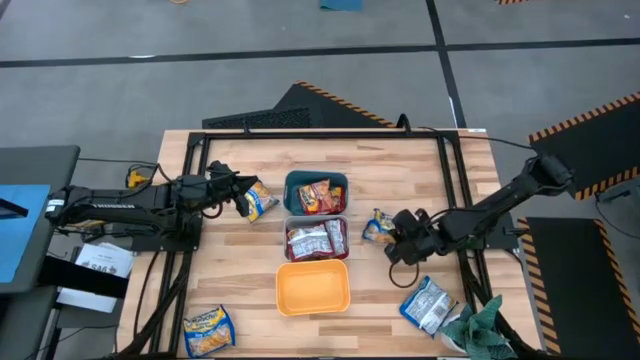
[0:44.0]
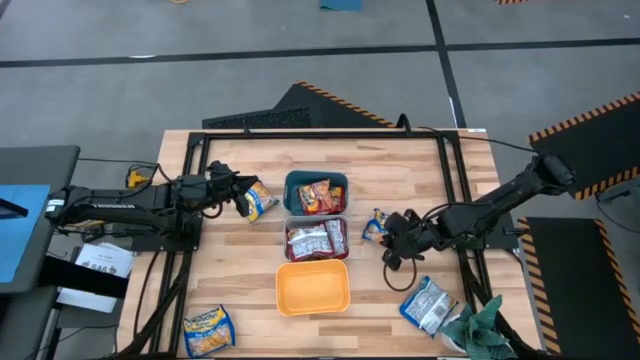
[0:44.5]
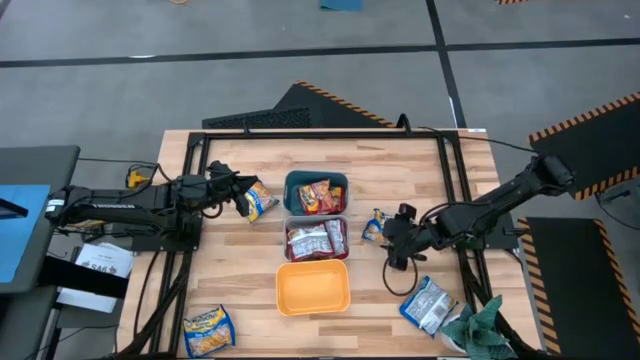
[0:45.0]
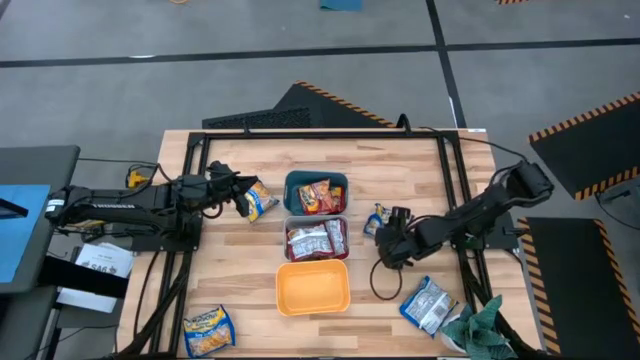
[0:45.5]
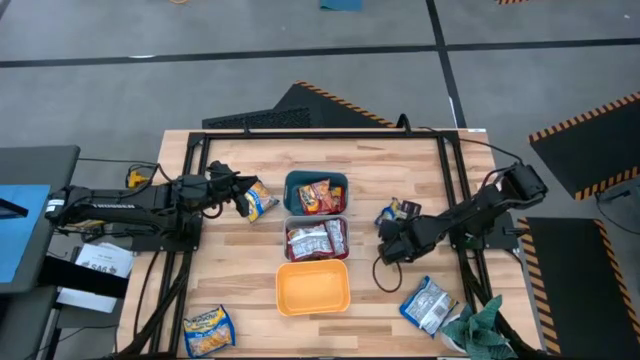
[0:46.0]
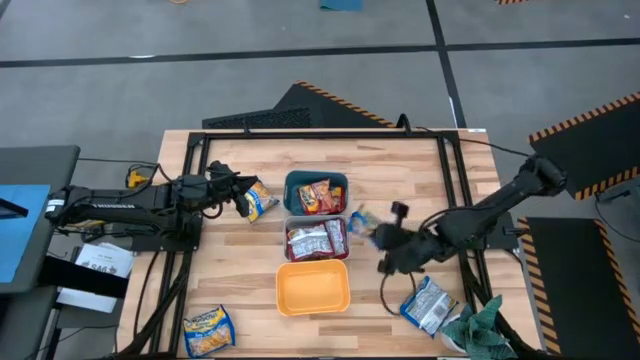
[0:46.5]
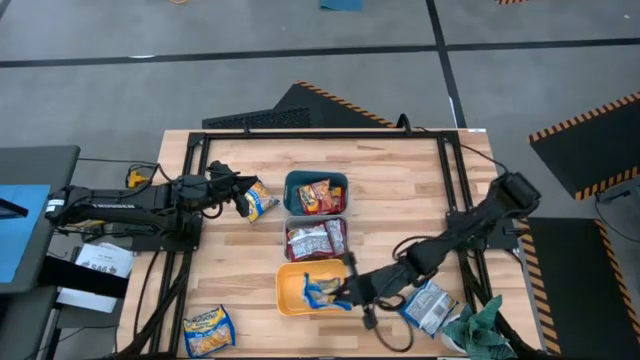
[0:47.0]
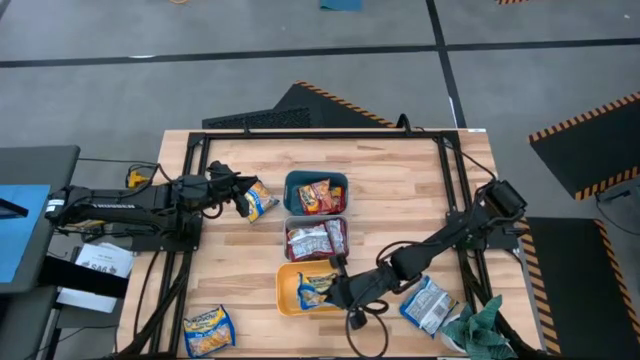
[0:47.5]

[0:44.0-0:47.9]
Task: Sort Maruchan noodles
Put the blue noodle pack into the yellow bin

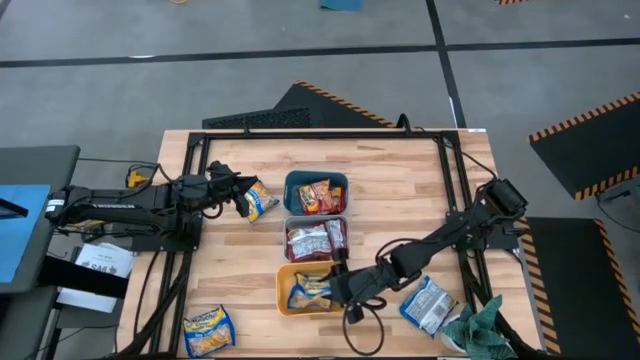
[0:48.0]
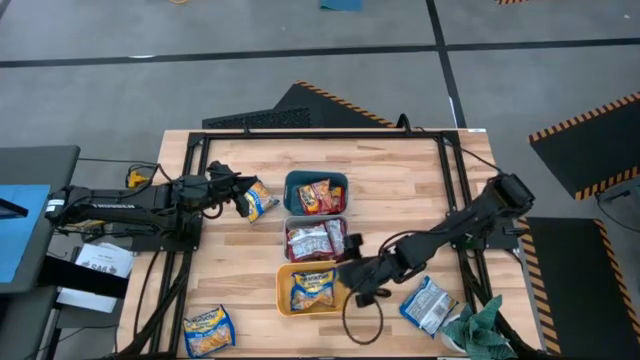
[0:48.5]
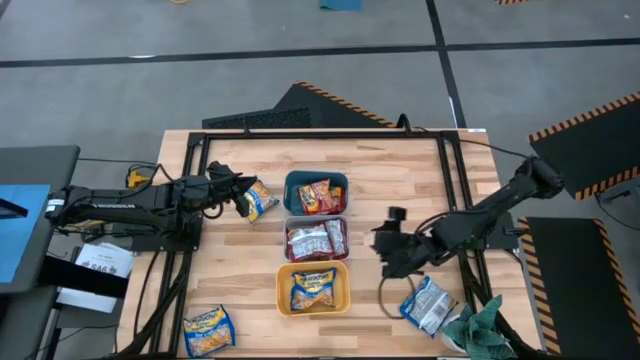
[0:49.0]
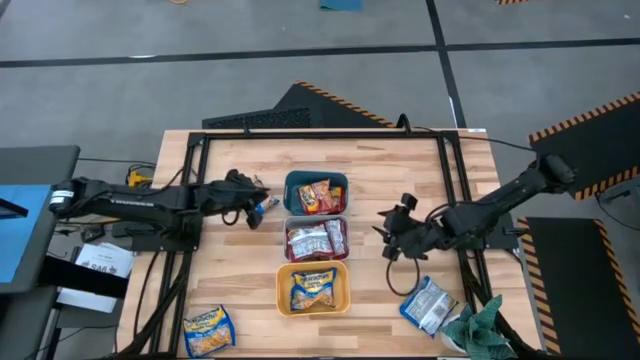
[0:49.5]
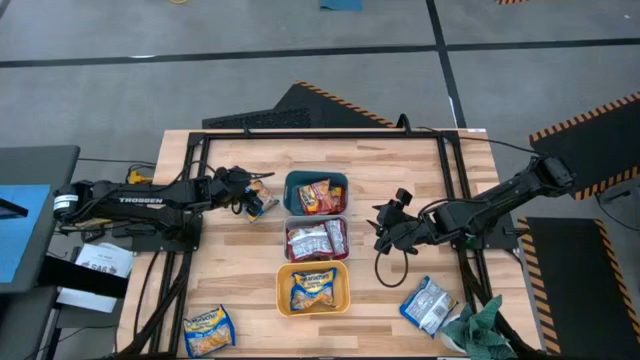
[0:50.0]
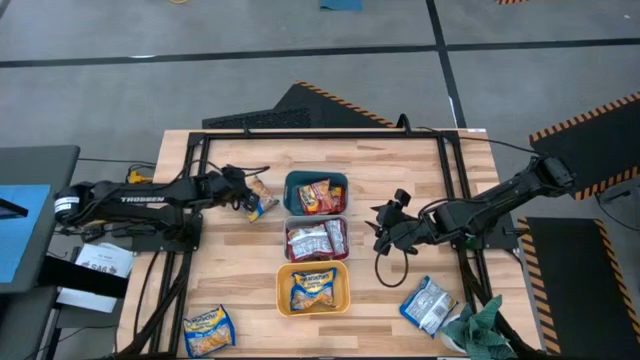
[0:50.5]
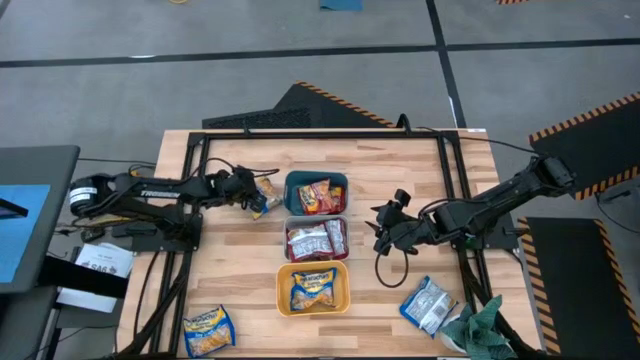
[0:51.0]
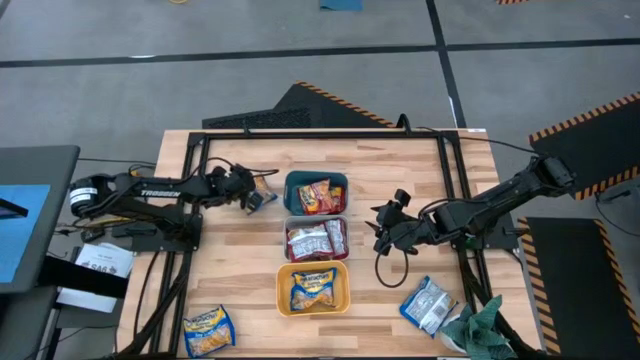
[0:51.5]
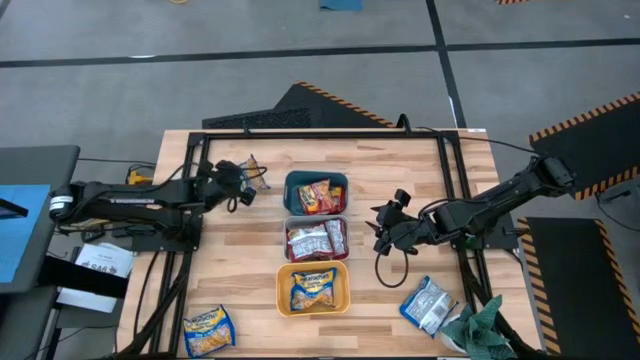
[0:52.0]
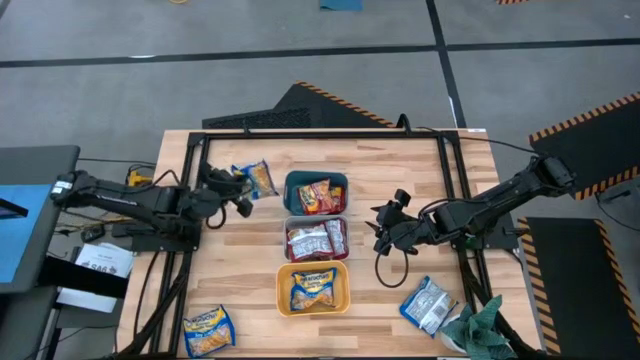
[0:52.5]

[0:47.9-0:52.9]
Put the blue noodle pack into the yellow bin

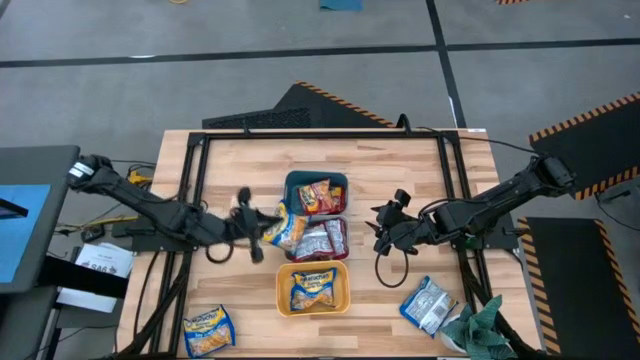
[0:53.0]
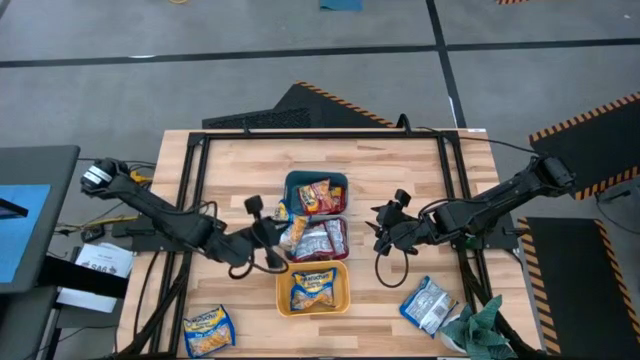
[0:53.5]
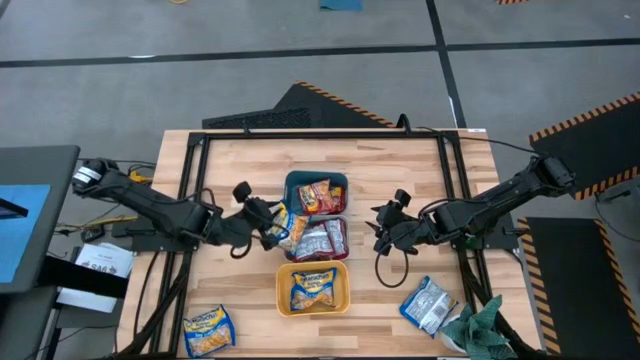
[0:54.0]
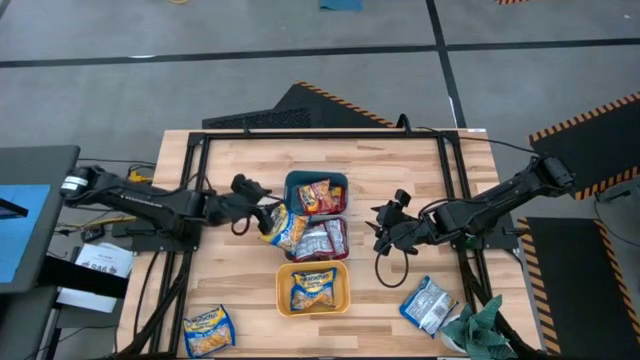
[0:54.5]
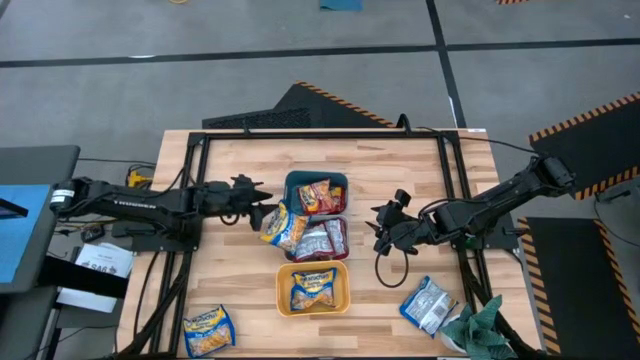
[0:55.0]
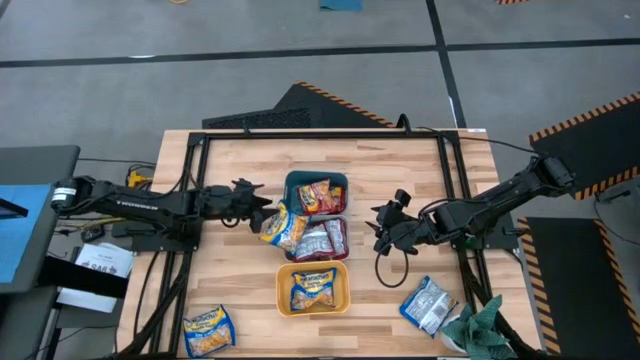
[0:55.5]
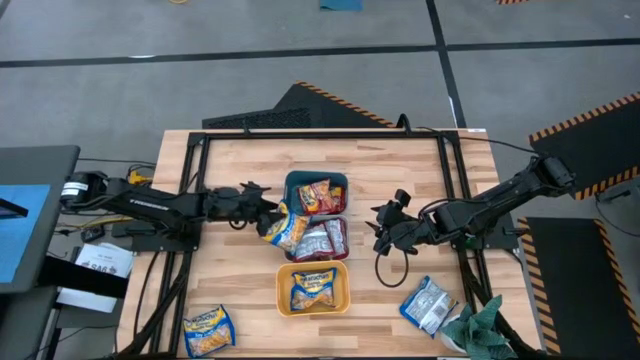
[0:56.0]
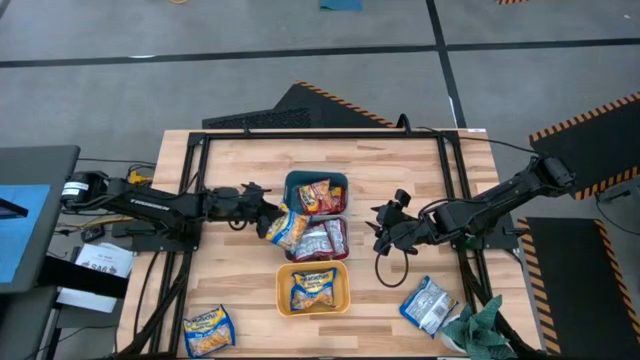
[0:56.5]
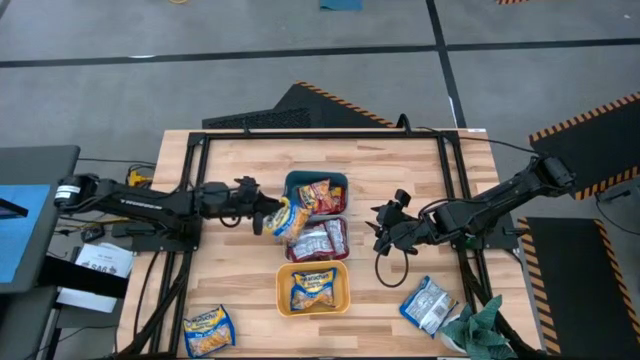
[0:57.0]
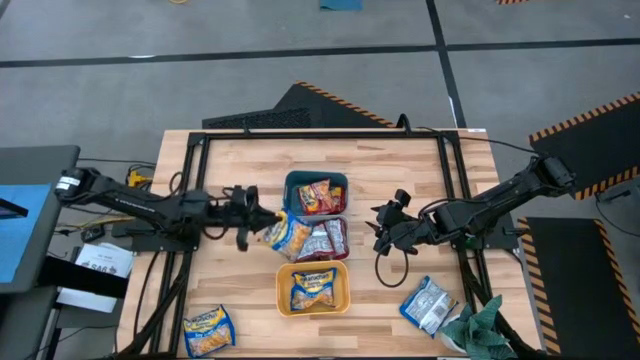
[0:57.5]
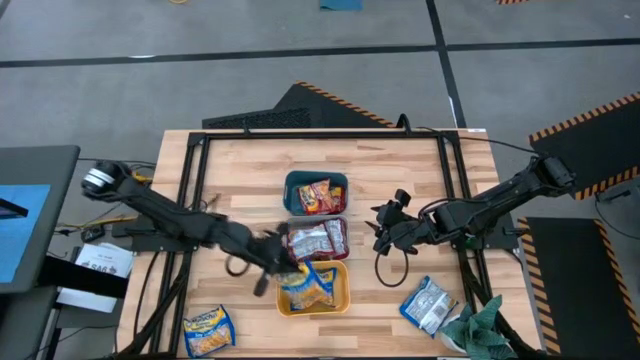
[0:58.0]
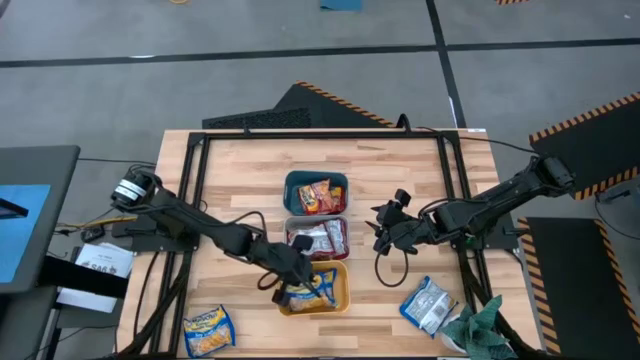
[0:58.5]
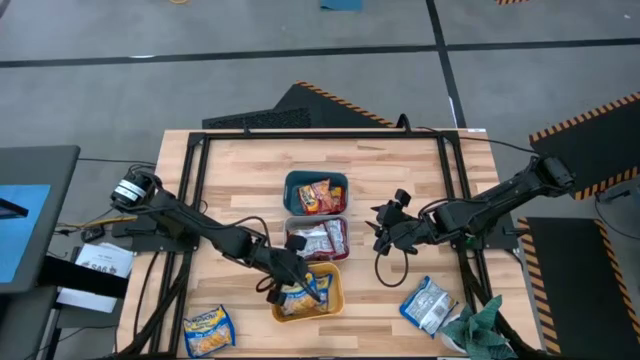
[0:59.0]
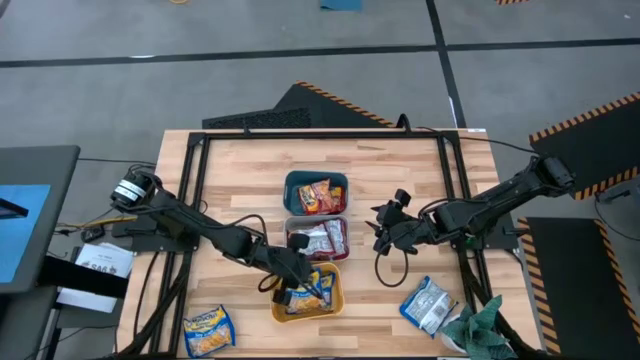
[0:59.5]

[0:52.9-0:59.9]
Put the blue noodle pack into the yellow bin

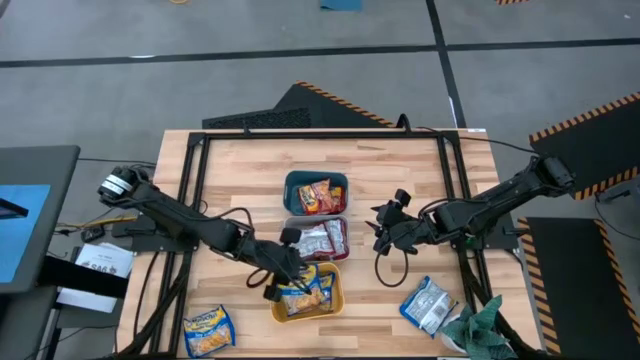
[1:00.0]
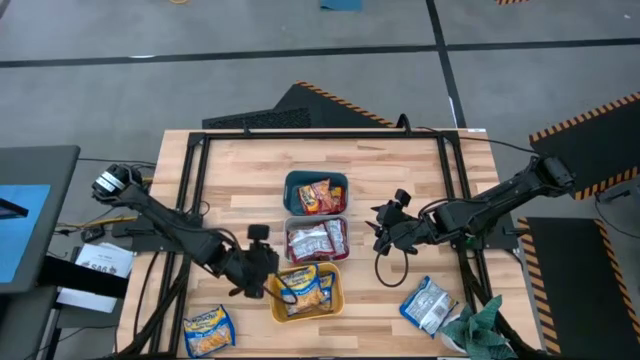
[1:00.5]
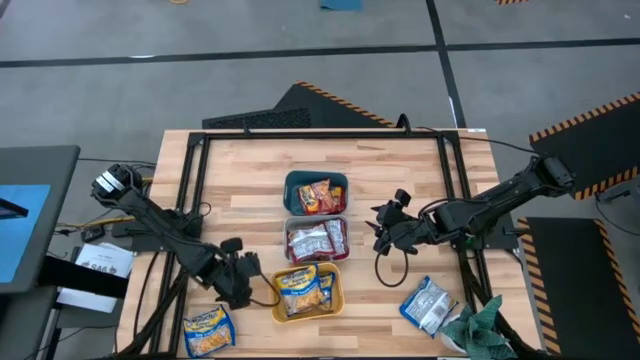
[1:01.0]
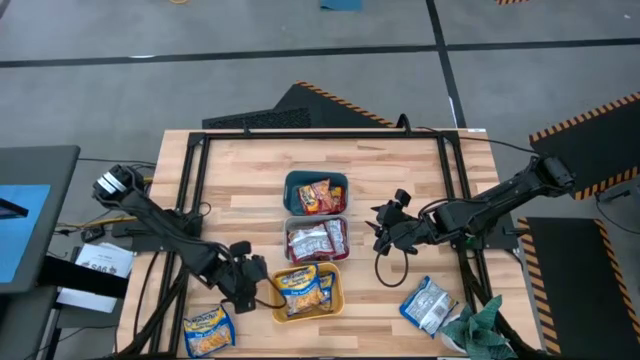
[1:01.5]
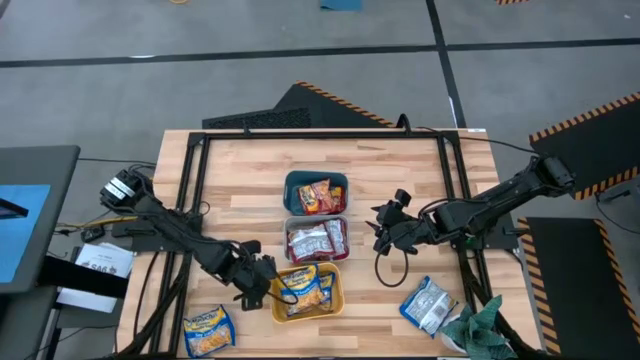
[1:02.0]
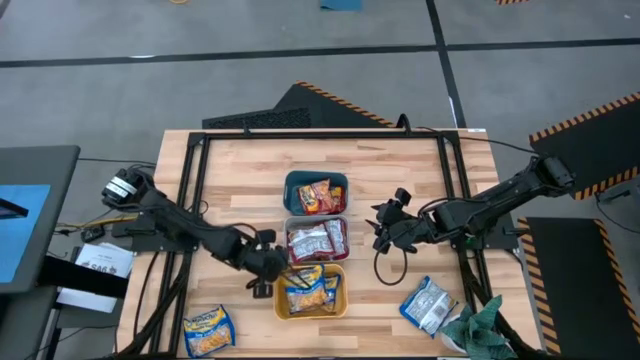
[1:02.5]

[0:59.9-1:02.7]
Adjust the yellow bin

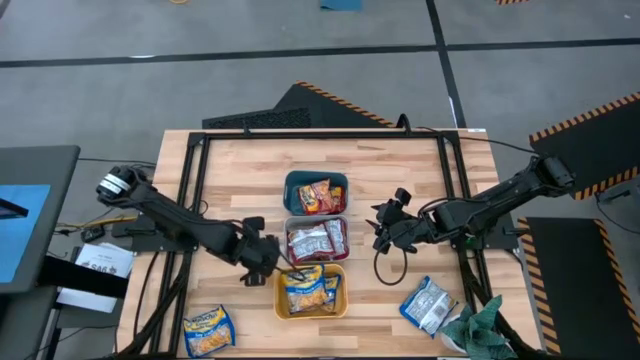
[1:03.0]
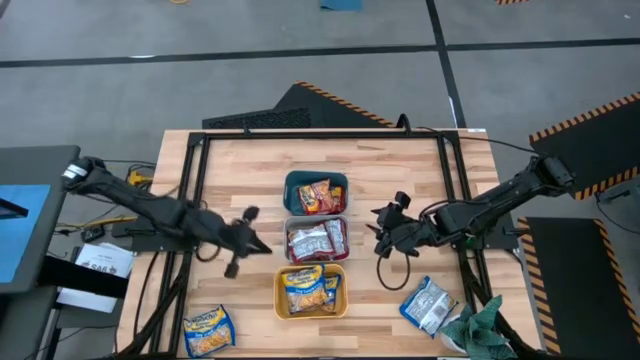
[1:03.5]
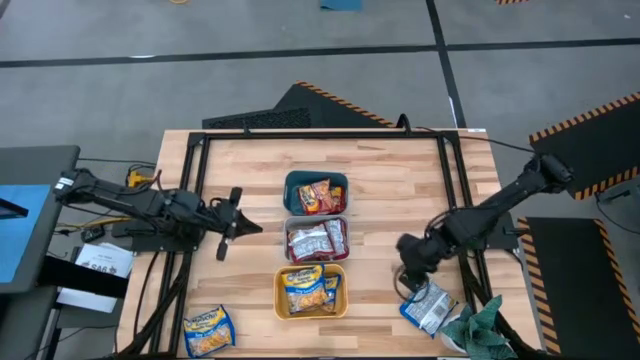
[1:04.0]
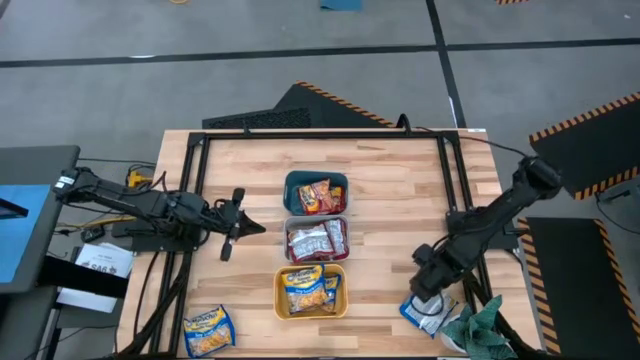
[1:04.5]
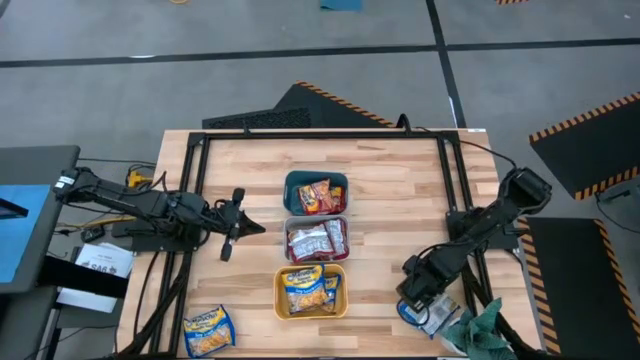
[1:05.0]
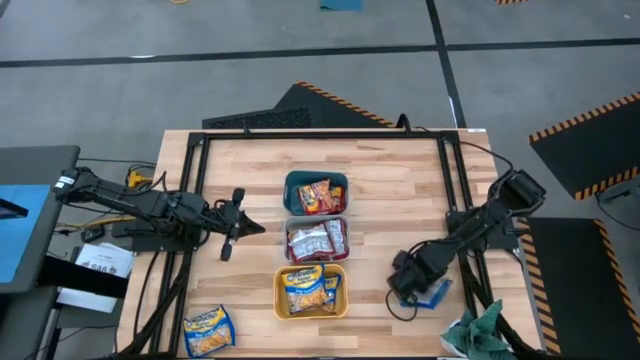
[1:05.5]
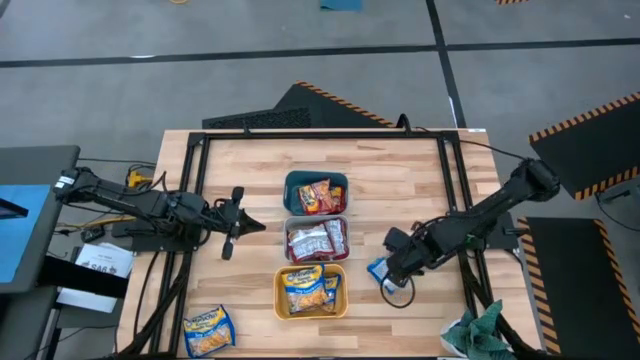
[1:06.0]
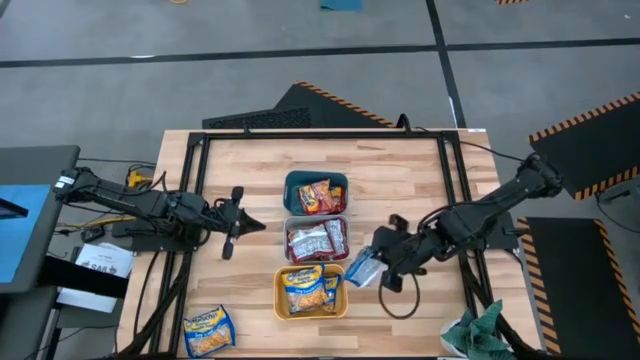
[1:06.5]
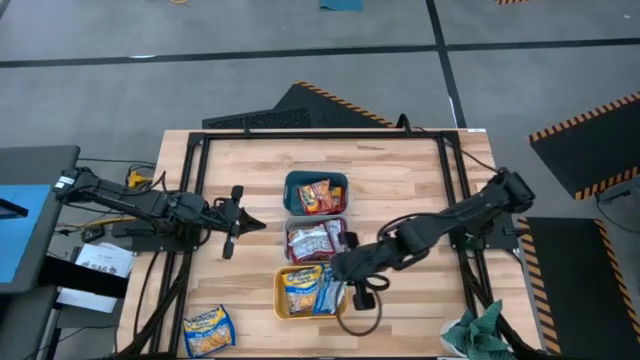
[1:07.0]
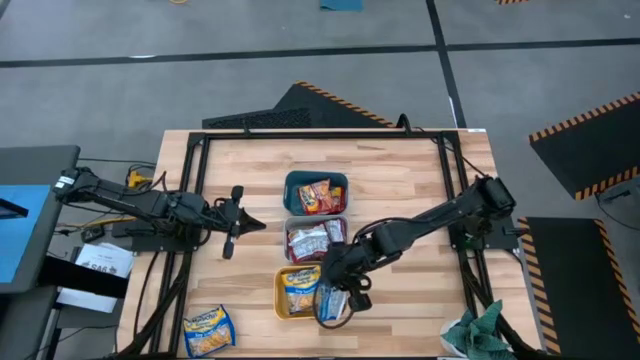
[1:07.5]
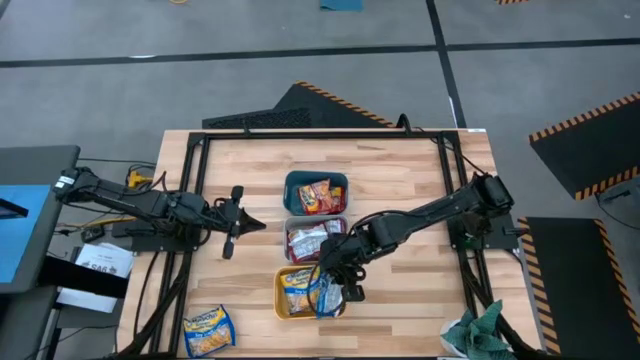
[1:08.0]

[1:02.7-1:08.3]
Put the blue noodle pack into the yellow bin
